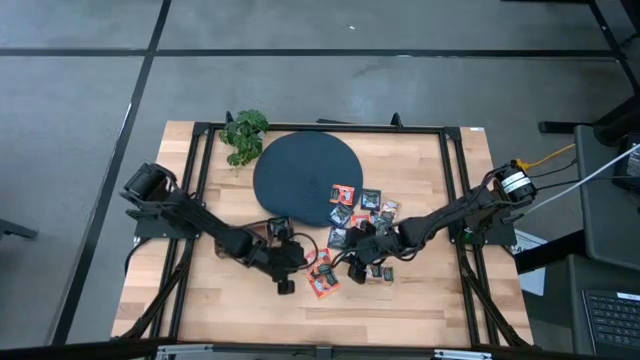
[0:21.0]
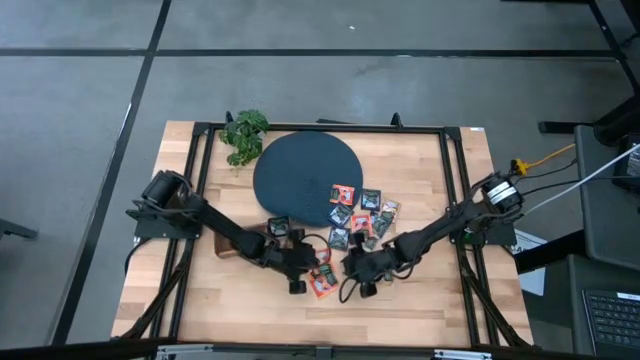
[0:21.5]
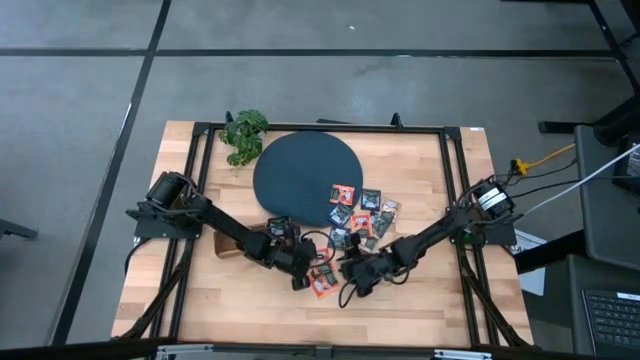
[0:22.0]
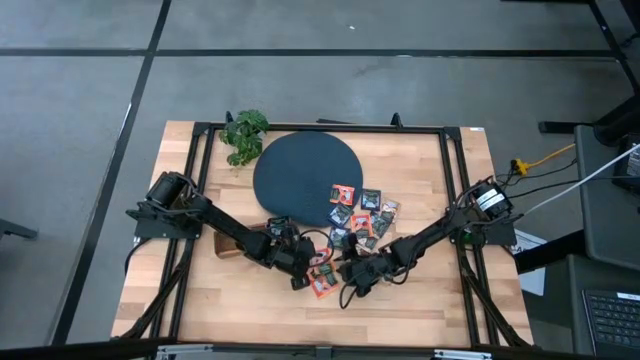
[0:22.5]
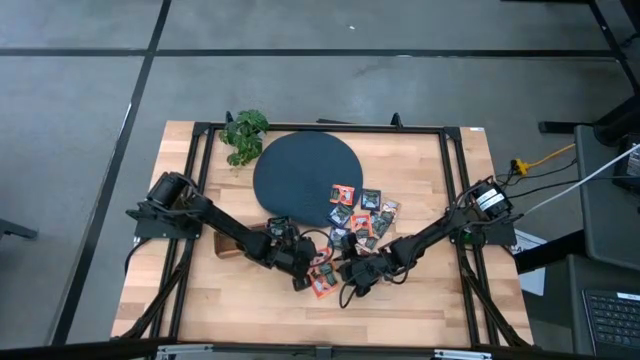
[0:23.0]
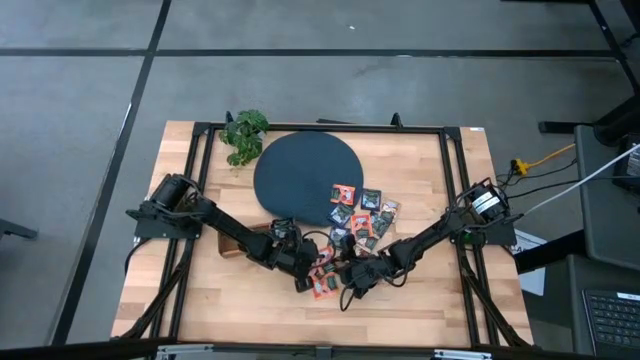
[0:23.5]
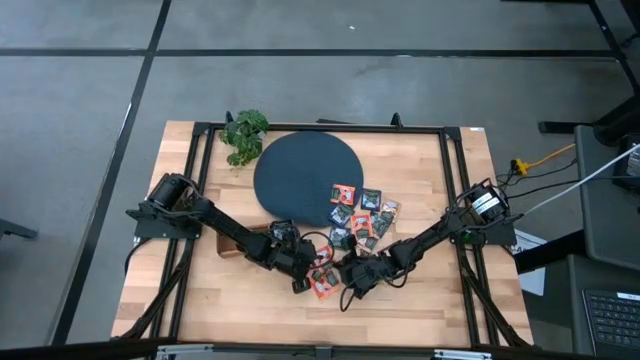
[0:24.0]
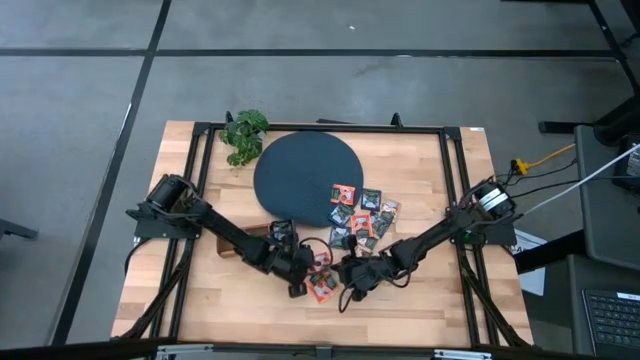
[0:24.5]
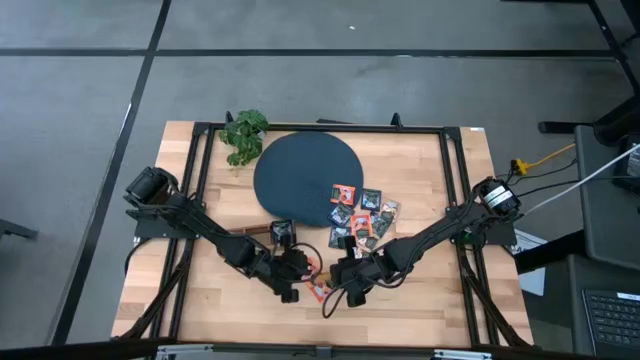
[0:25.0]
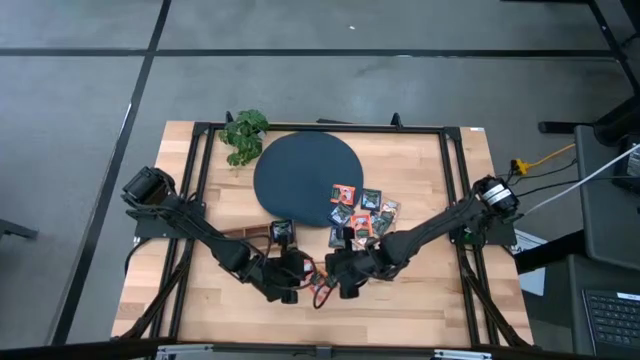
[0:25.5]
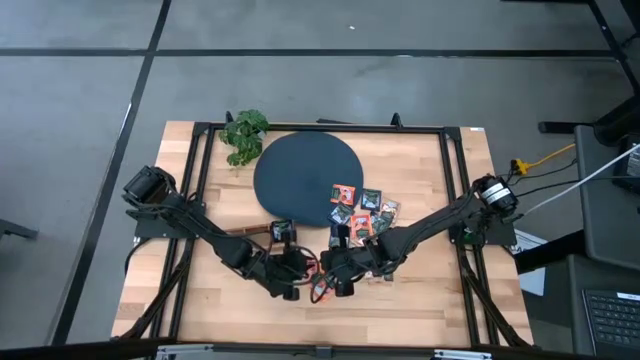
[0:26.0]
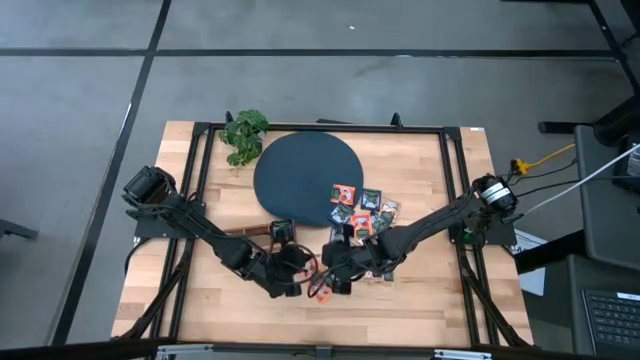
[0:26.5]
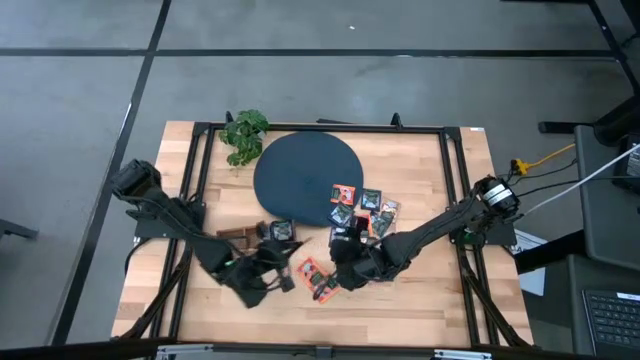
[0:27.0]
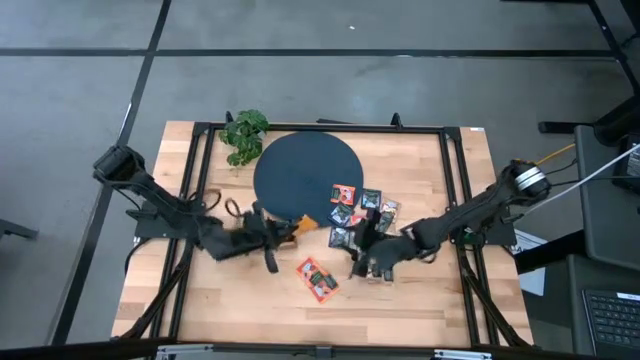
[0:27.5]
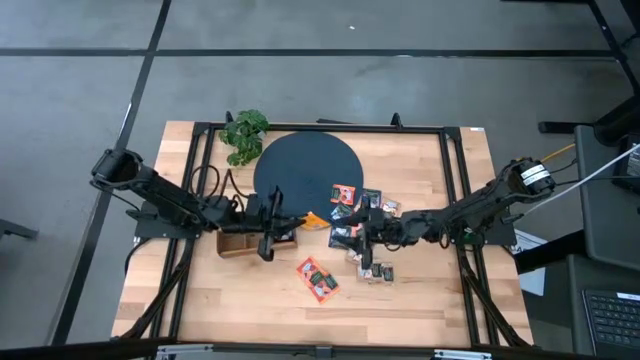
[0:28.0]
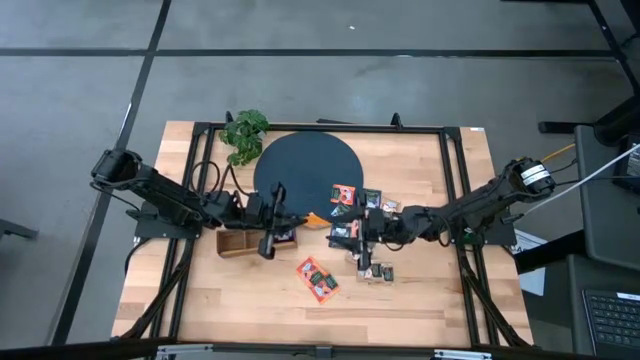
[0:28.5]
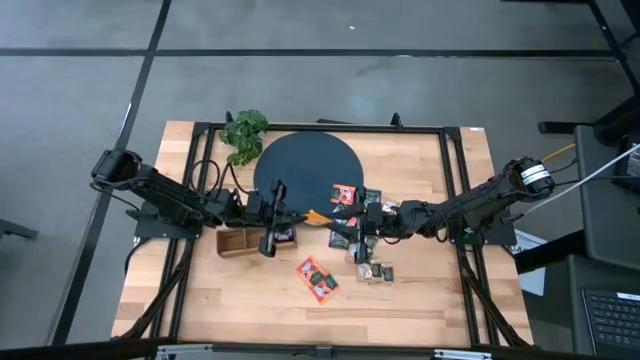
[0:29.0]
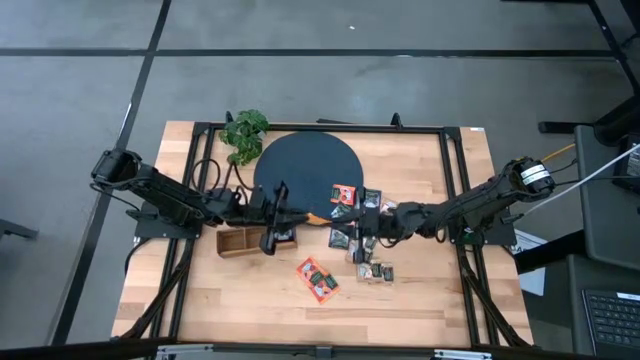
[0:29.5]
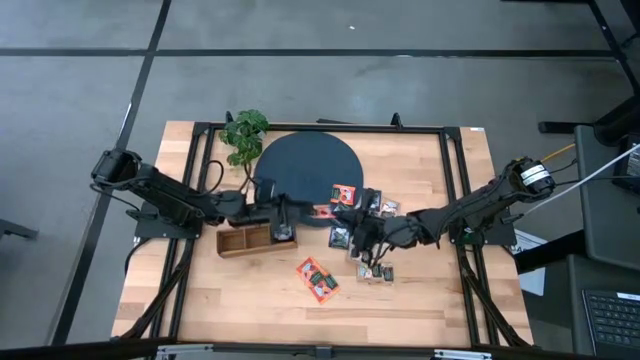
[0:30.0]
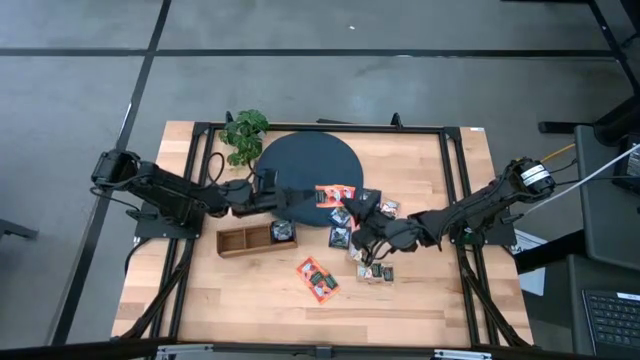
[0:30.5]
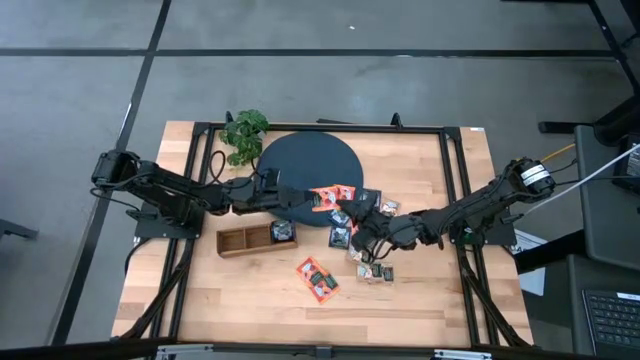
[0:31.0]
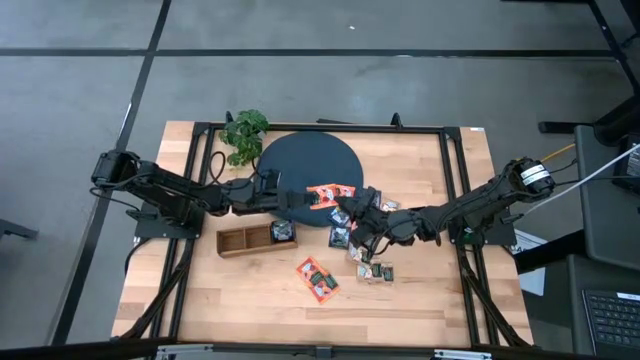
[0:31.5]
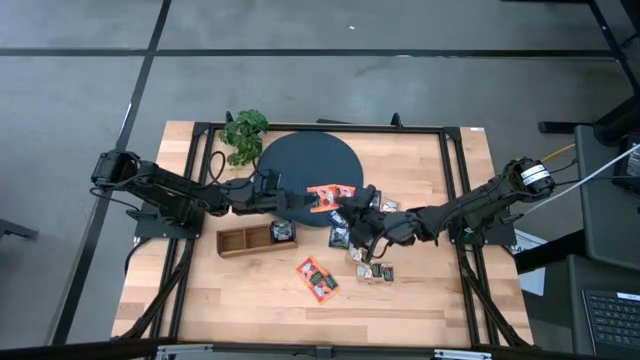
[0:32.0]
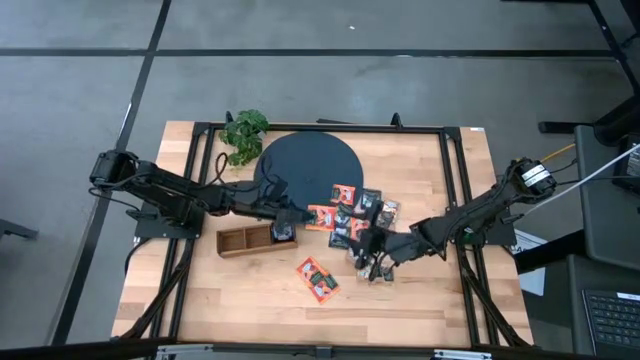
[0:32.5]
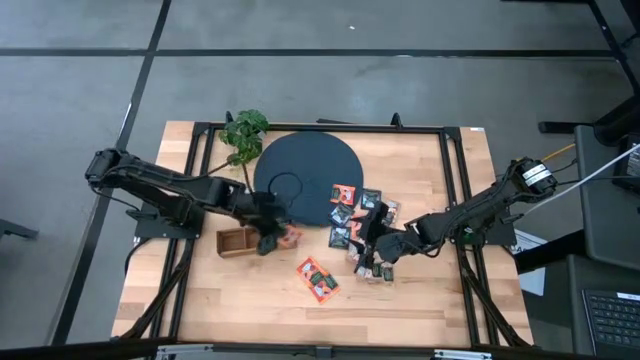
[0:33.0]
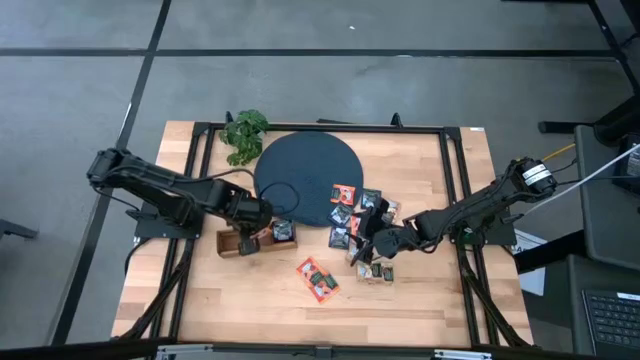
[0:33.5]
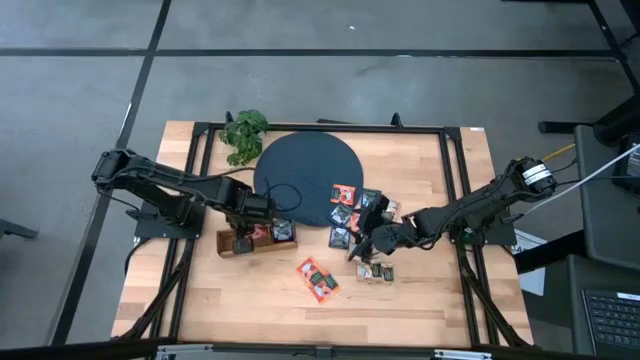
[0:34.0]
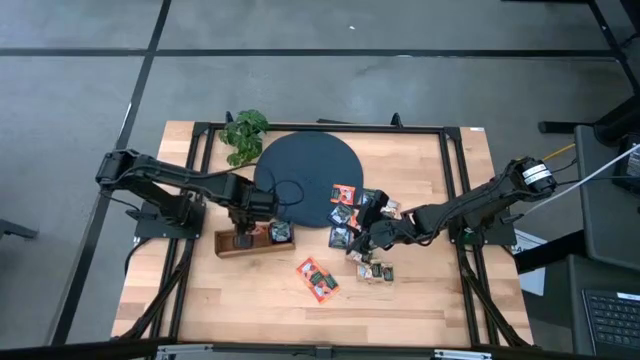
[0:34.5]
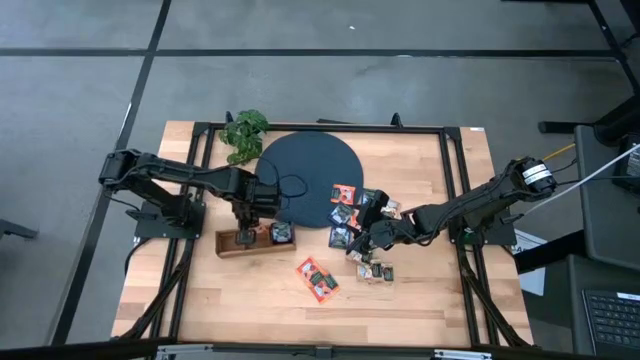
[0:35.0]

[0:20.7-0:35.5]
Task: Pick & Place Tea
Put the orange tea bag into the middle section of the wooden organizer
